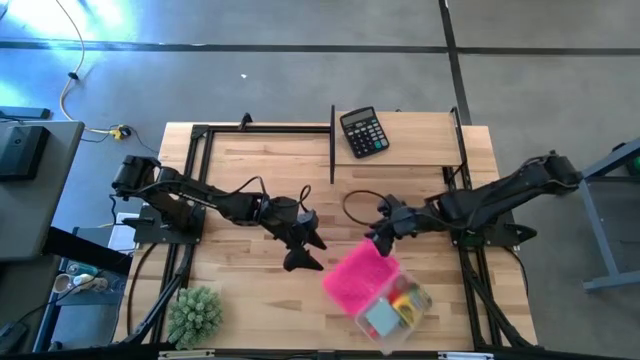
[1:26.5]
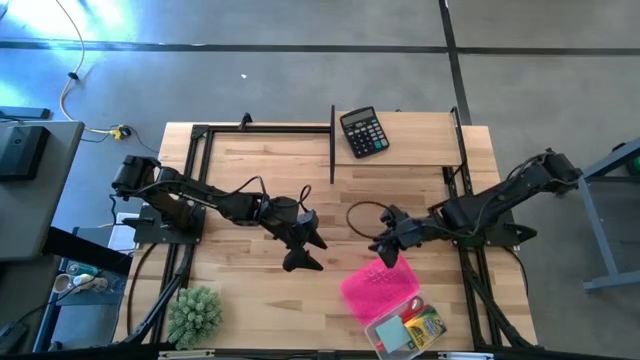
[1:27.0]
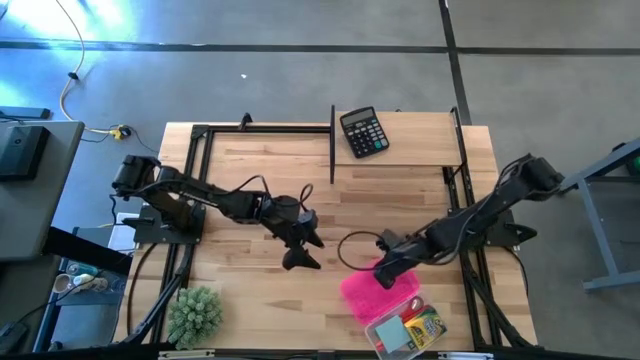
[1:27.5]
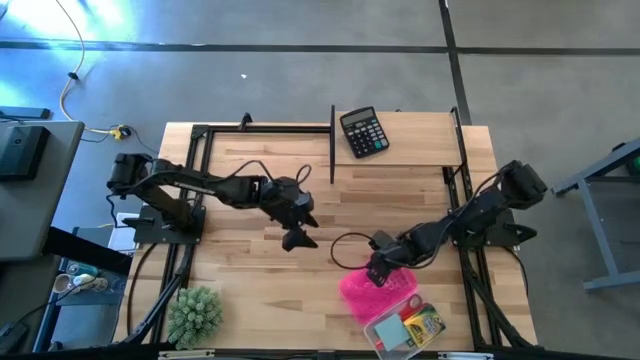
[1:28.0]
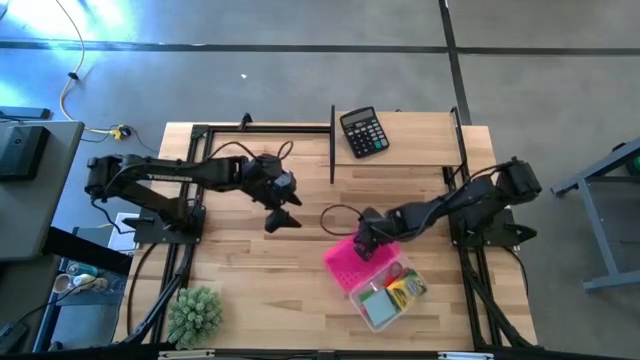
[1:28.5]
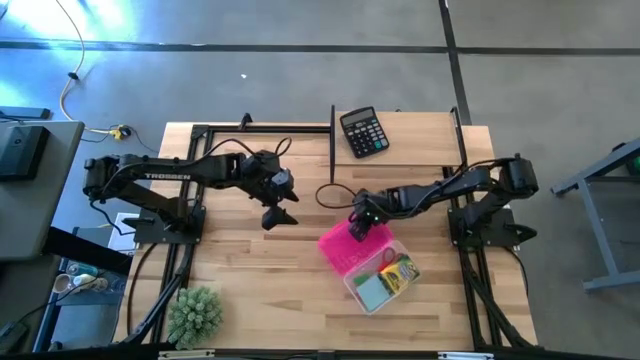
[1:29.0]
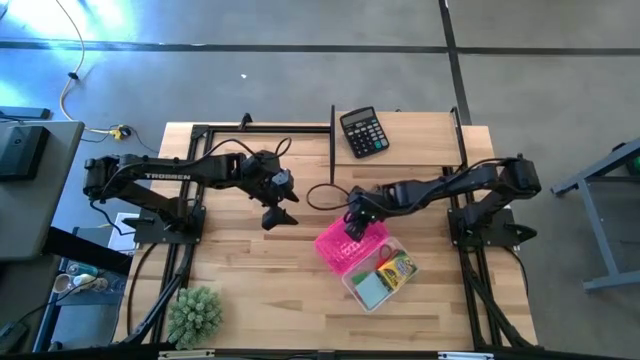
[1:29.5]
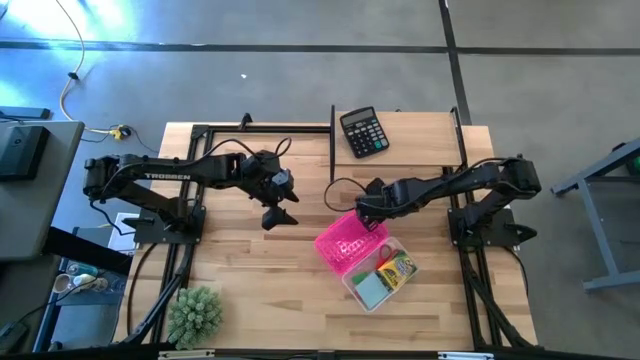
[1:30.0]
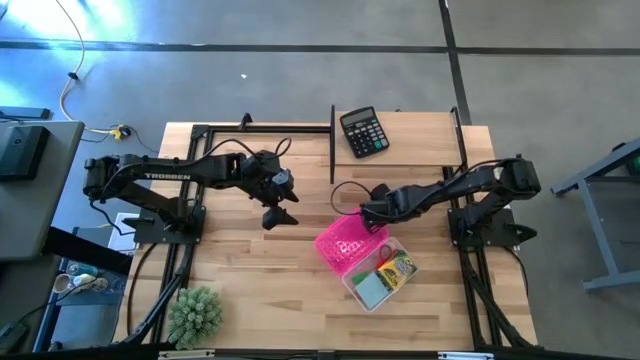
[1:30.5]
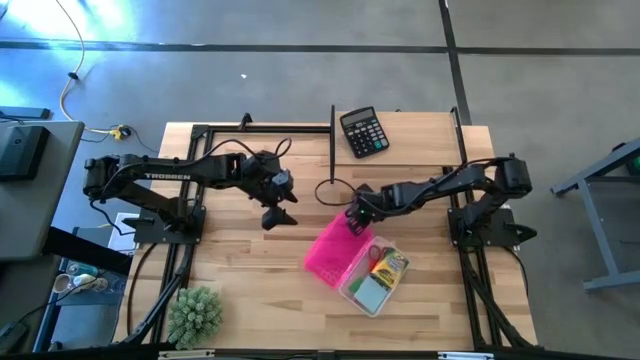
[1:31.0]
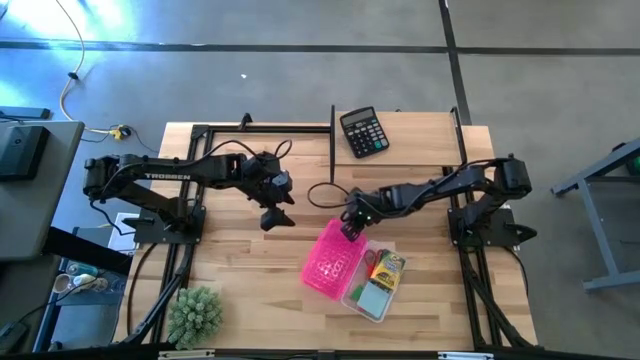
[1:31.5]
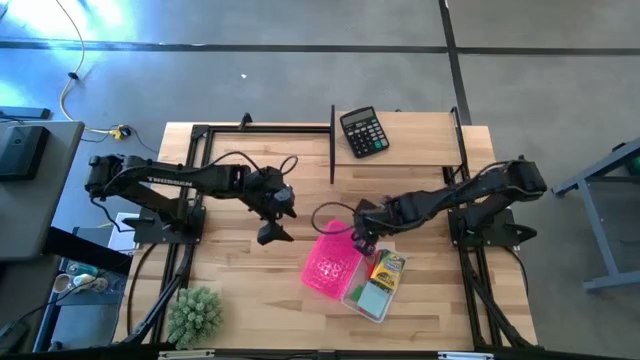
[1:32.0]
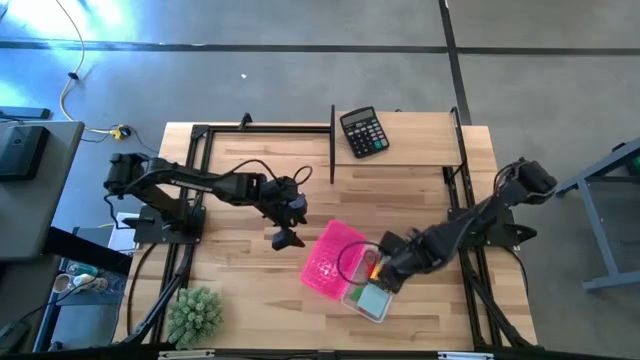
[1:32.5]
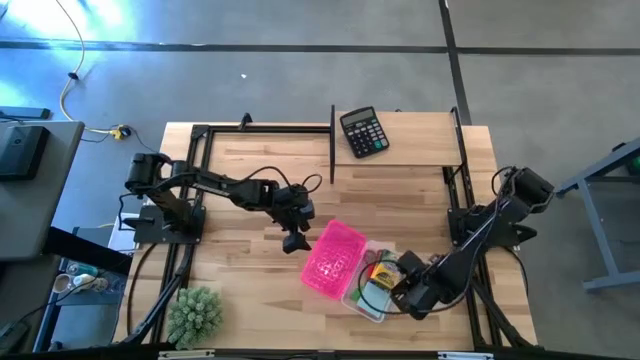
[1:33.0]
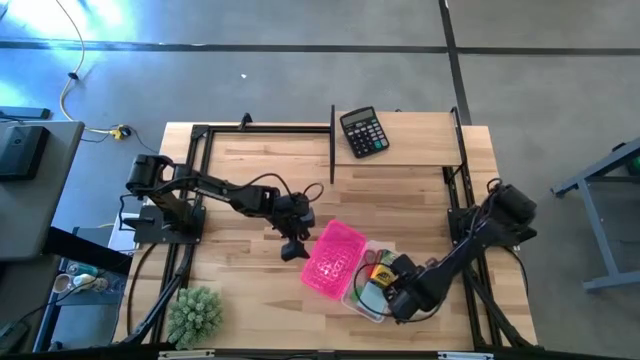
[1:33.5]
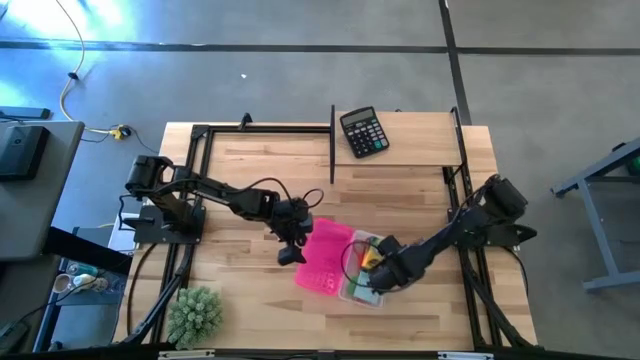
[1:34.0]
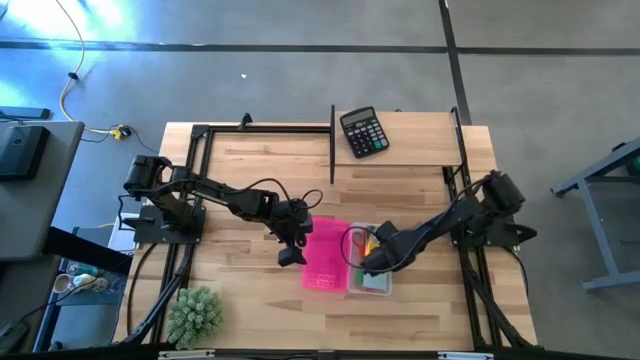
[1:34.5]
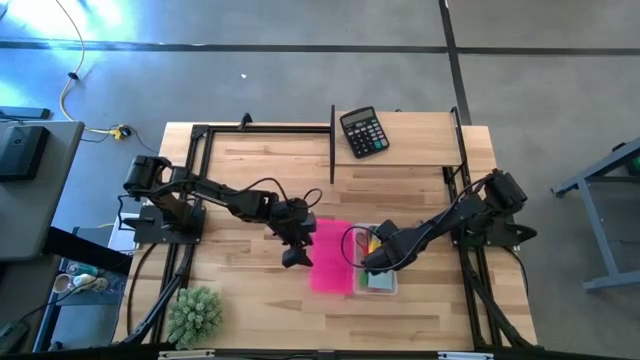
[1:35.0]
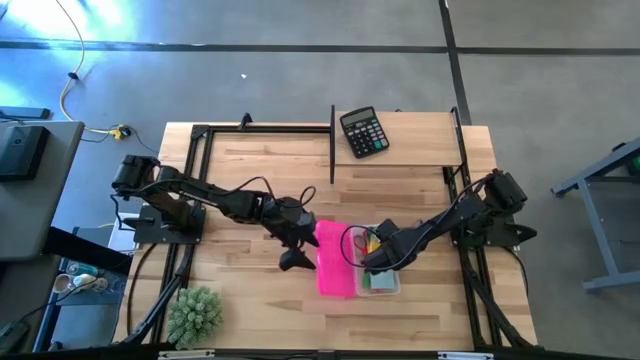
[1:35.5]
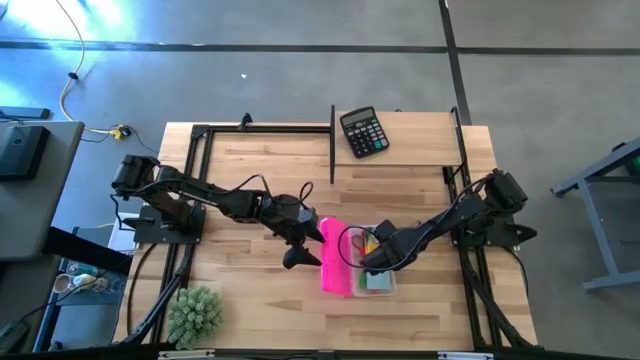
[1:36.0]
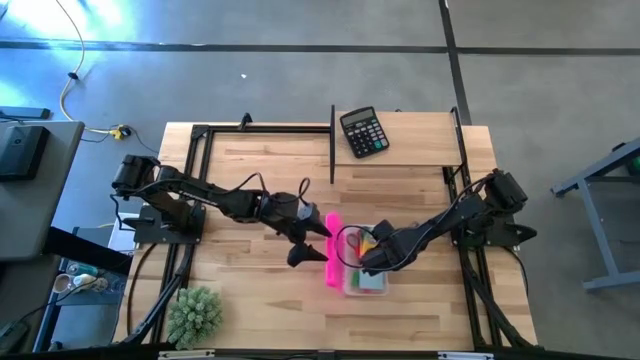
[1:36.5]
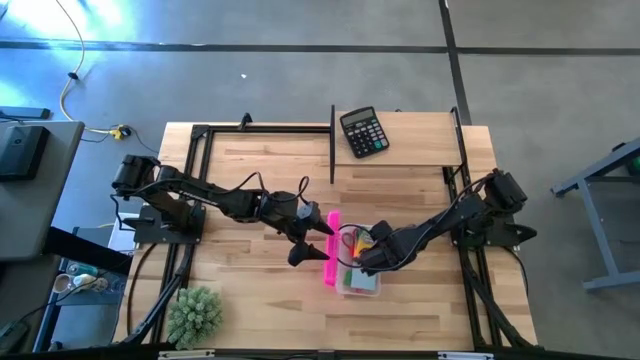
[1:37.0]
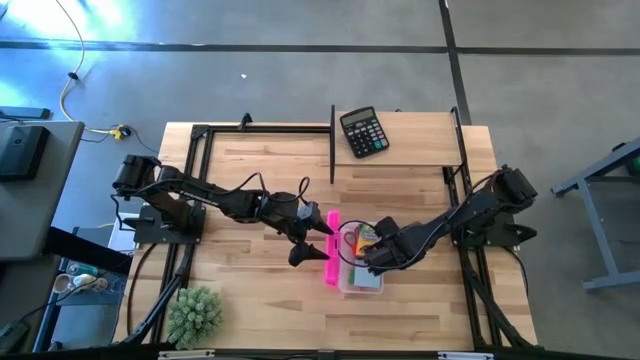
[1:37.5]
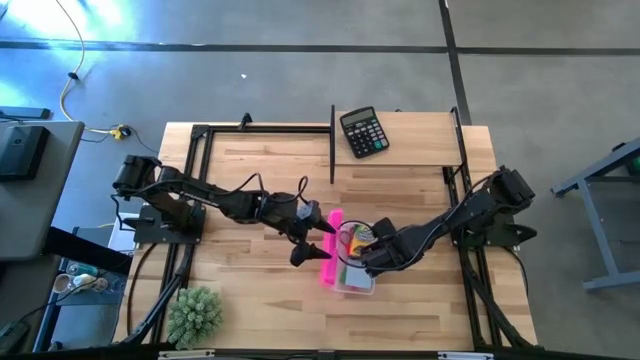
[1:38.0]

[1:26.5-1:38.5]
Task: Pack school essentials
Close the pink supply box

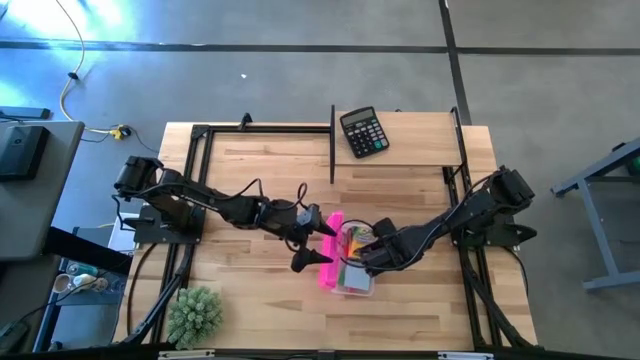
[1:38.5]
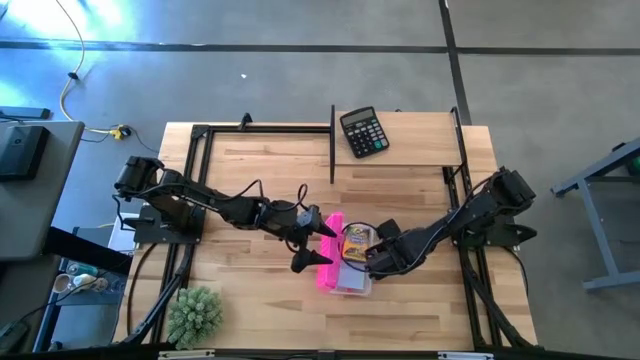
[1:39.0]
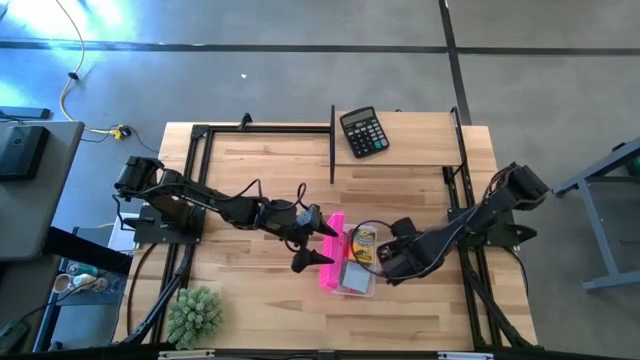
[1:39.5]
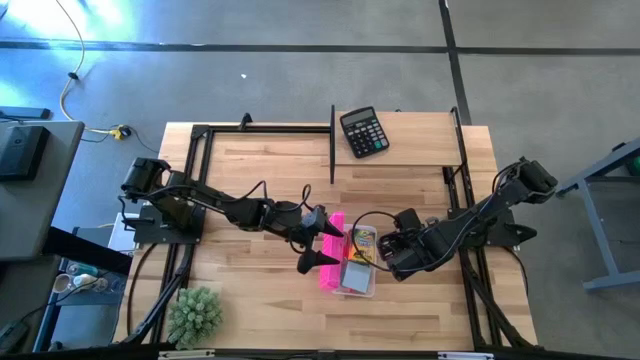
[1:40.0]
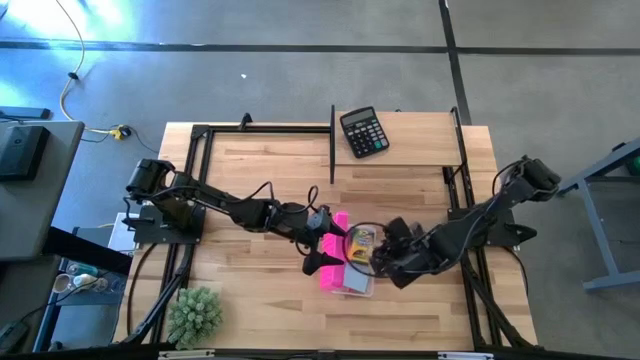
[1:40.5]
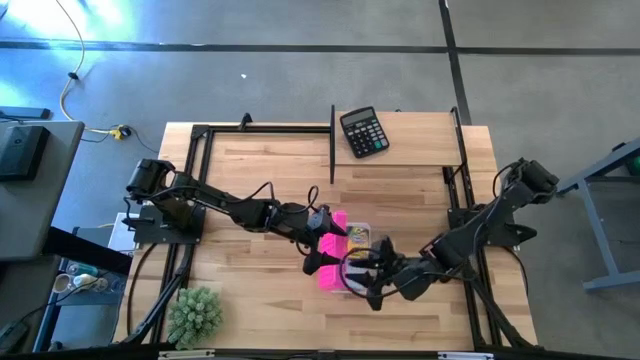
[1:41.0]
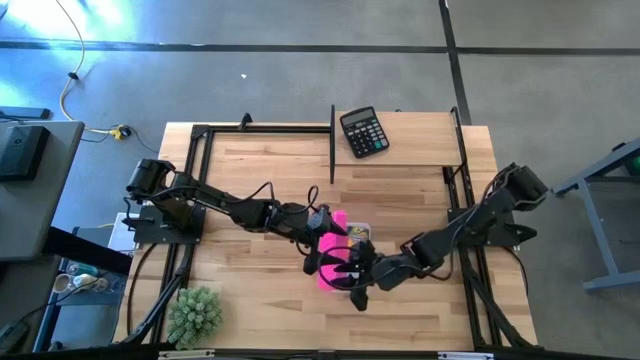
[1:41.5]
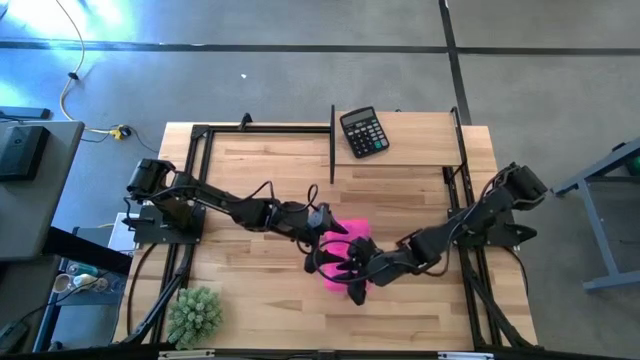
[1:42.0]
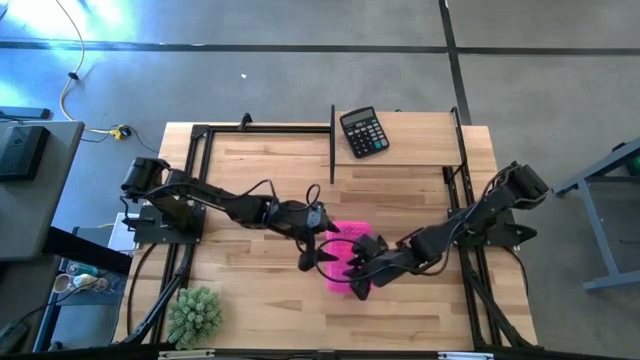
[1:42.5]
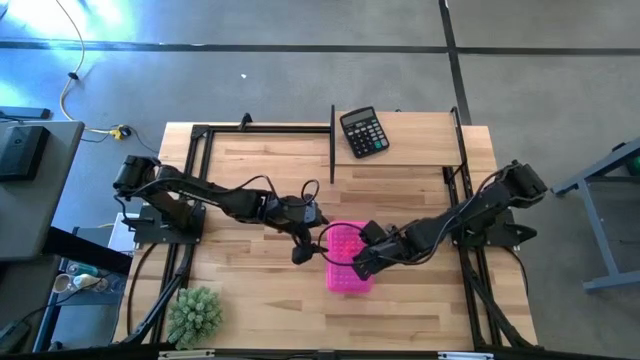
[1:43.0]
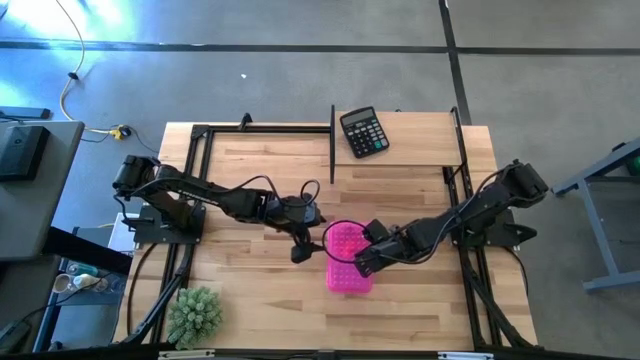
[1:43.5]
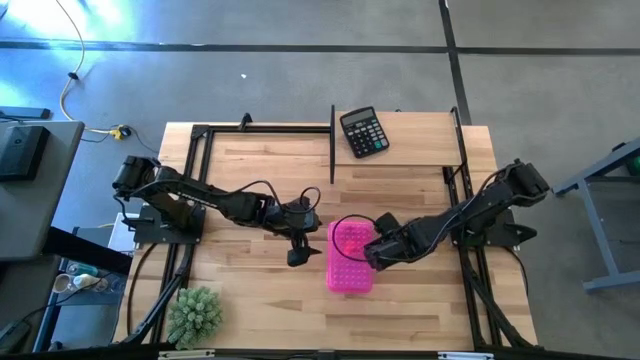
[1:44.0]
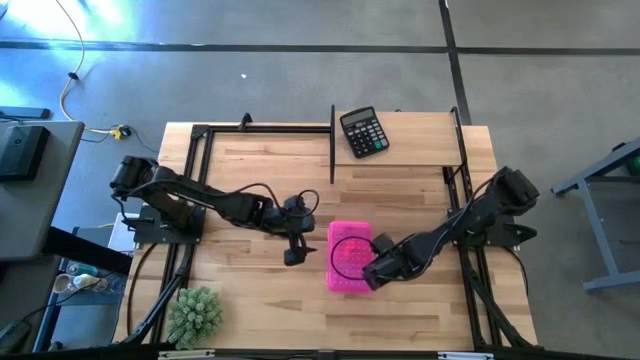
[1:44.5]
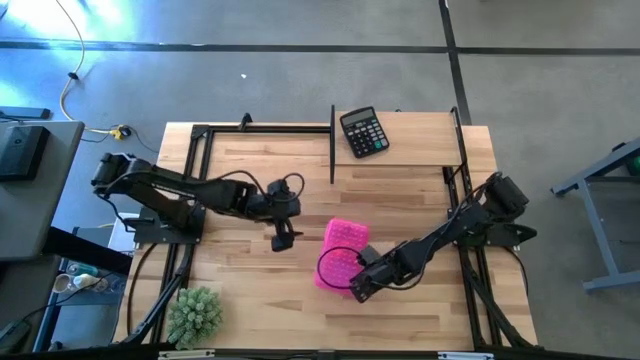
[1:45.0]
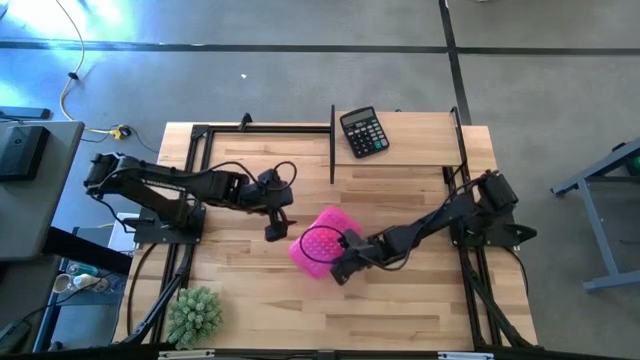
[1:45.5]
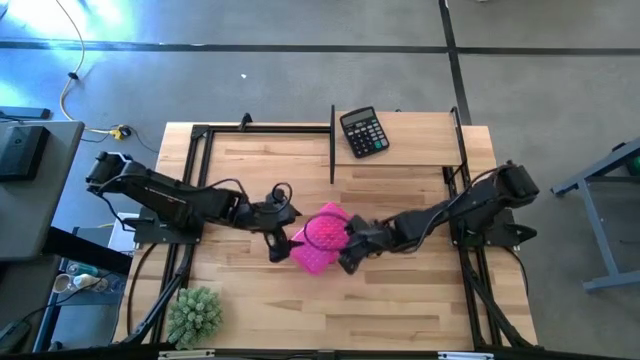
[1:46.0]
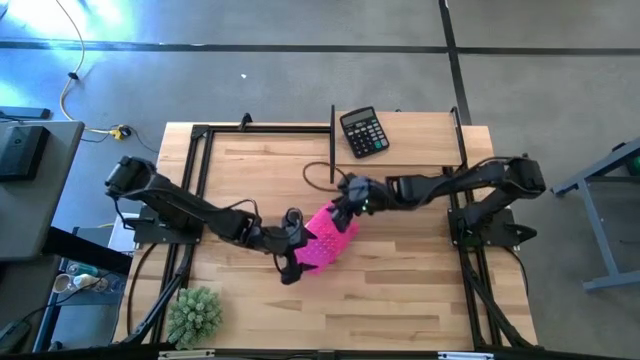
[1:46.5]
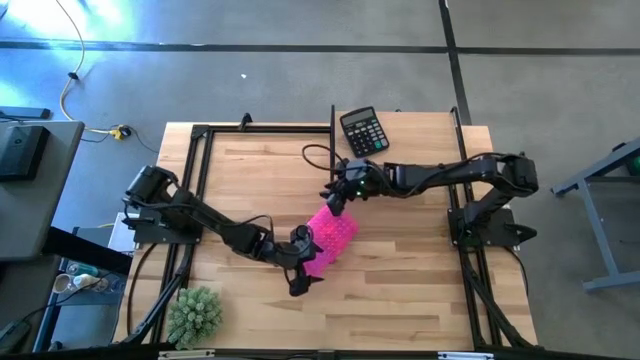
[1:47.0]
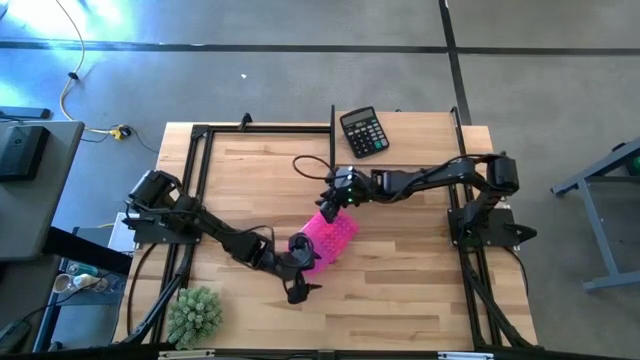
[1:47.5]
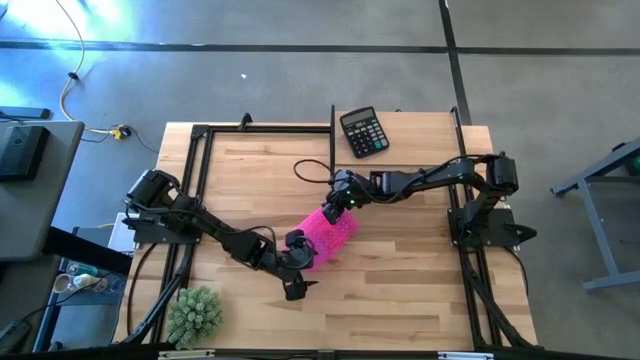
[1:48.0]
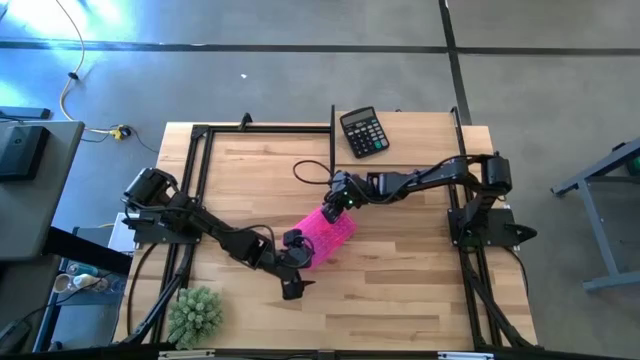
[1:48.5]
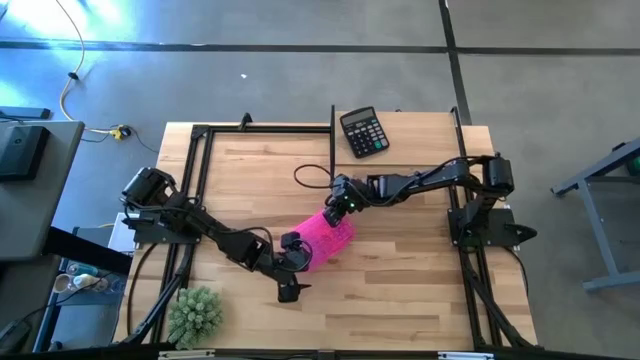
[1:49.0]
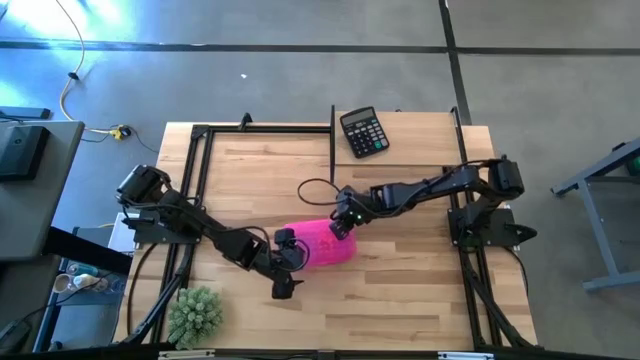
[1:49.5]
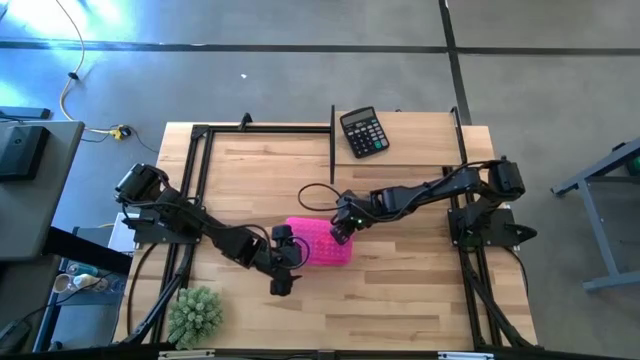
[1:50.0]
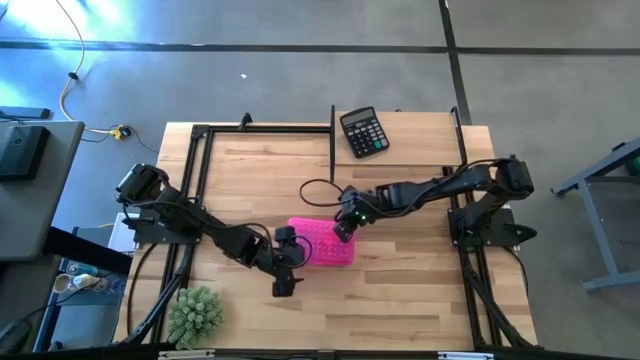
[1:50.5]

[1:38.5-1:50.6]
Close the pink supply box
